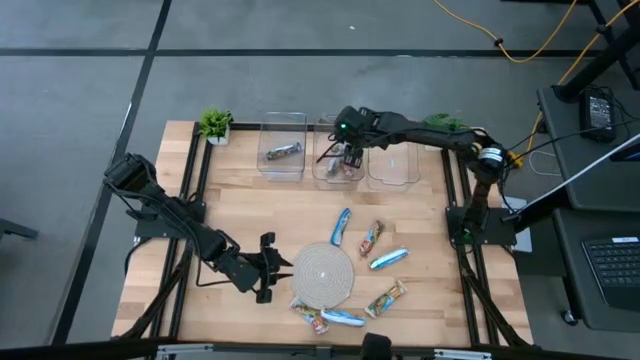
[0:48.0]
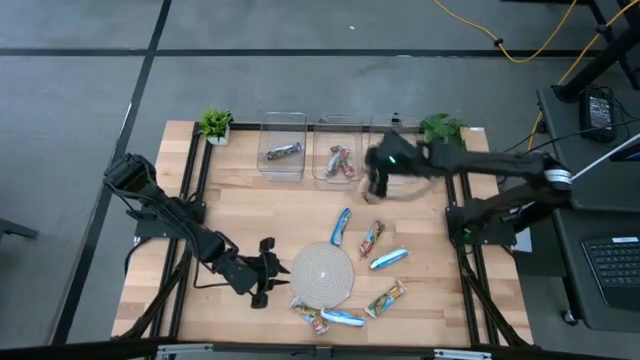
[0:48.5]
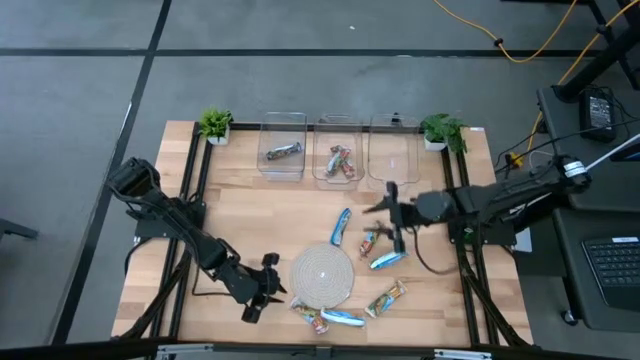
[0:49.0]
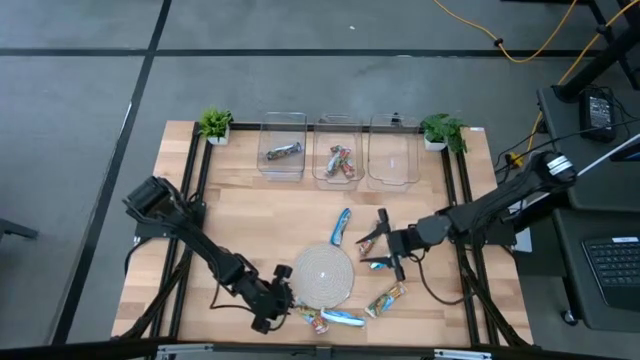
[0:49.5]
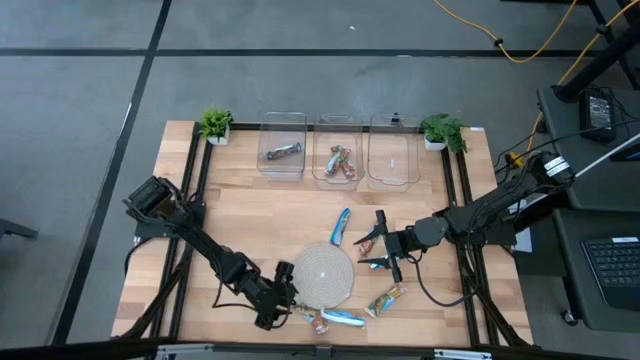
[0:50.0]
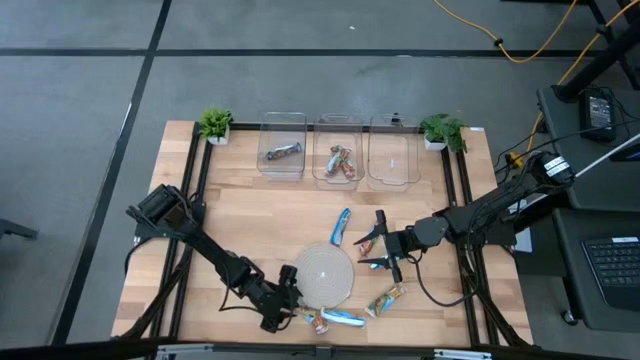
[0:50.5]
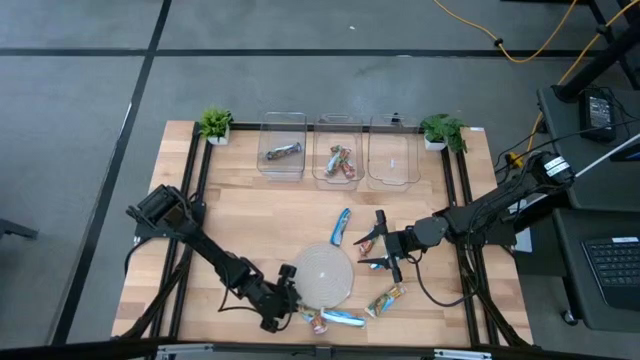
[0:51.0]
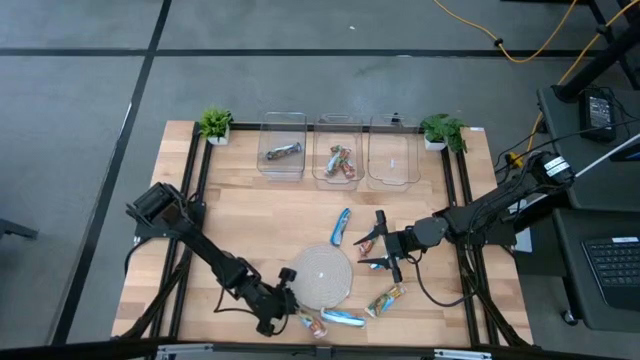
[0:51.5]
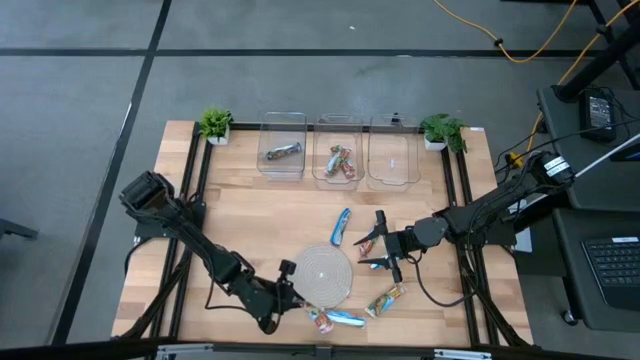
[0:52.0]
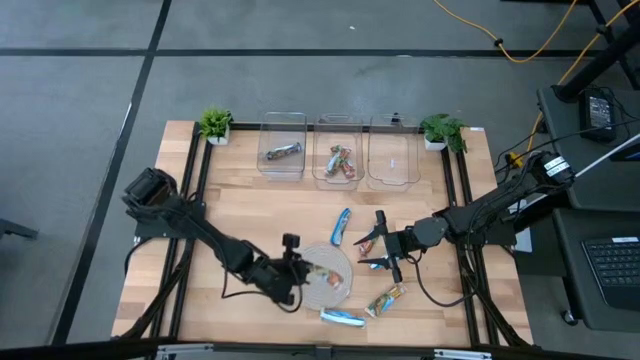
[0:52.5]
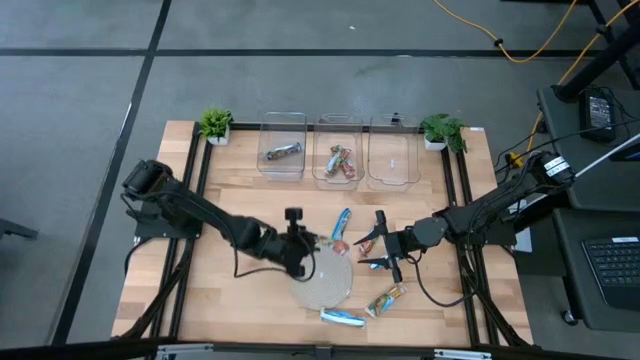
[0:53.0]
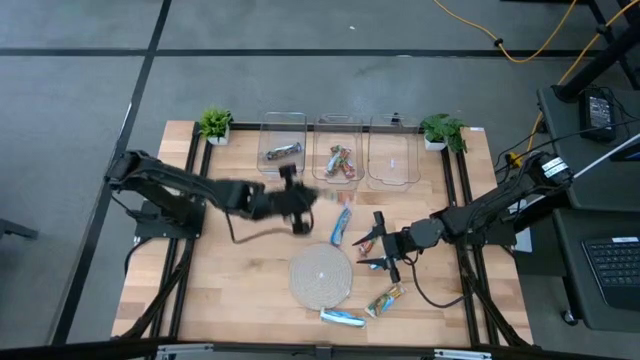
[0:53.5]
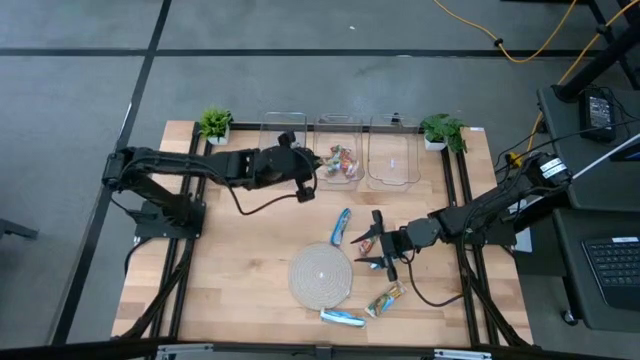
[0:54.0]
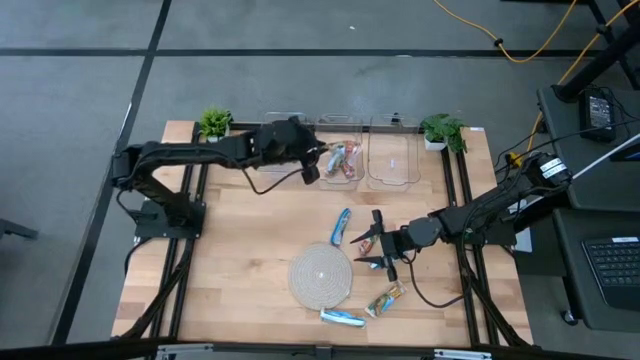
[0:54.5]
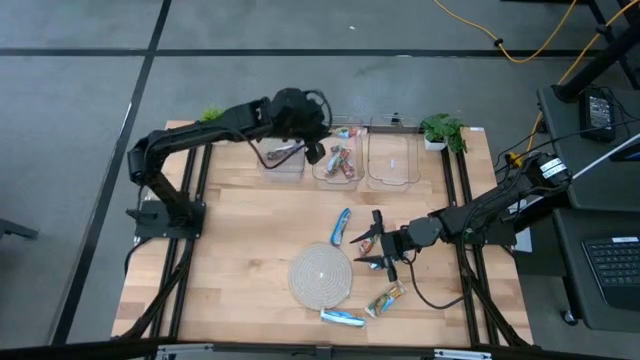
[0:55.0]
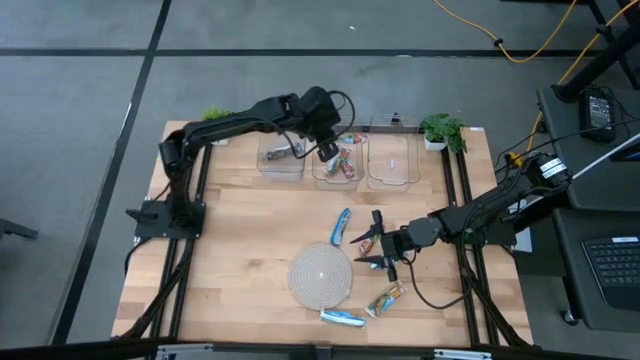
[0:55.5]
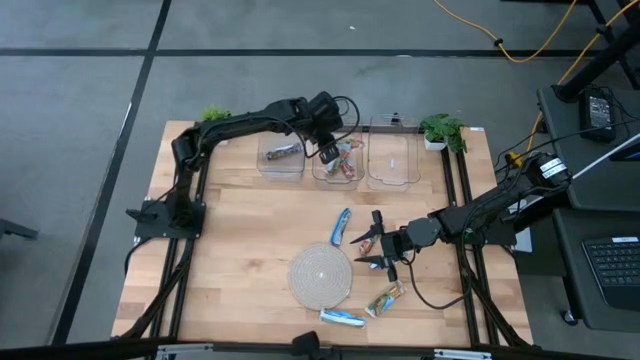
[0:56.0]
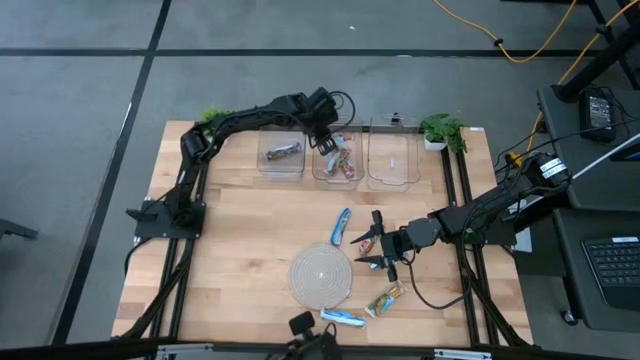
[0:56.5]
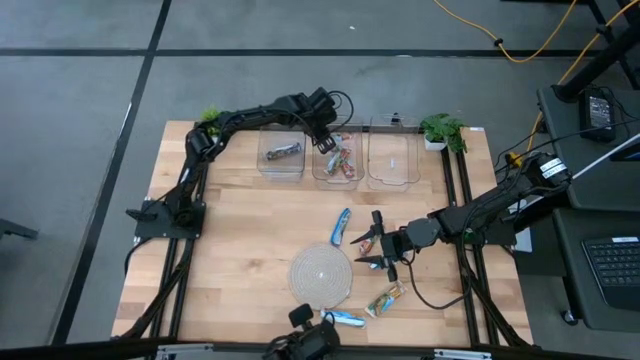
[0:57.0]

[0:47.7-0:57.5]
Task: Pick and place Granola Bars by type
Put the red granola bar into the center transparent bin

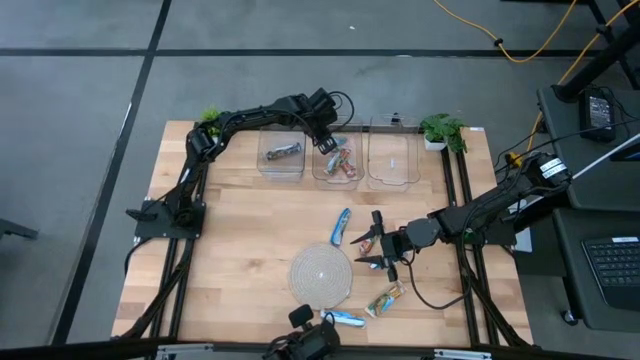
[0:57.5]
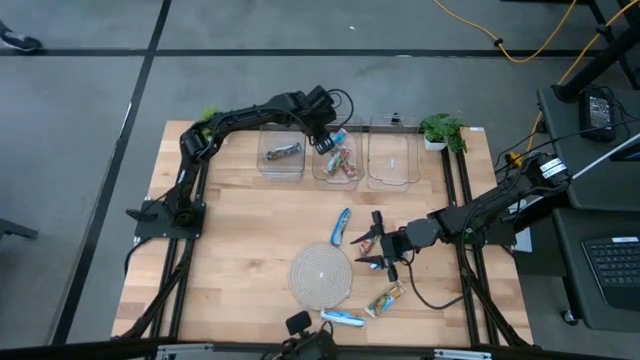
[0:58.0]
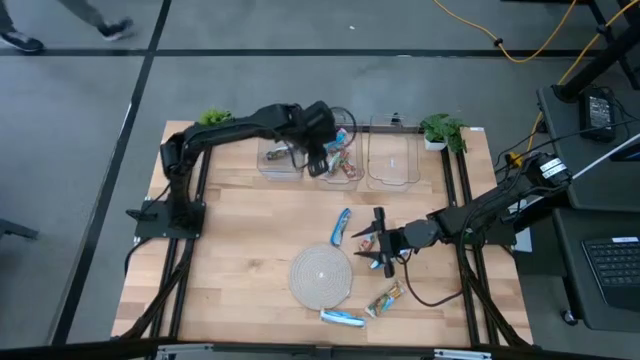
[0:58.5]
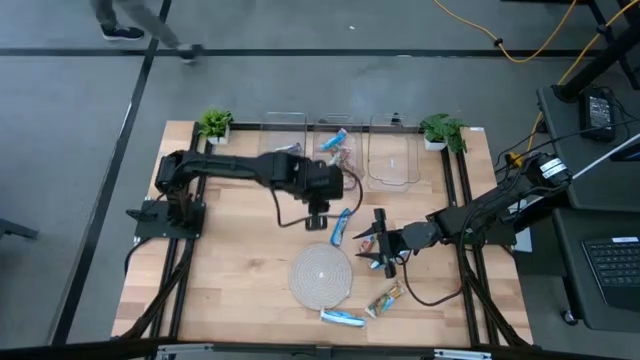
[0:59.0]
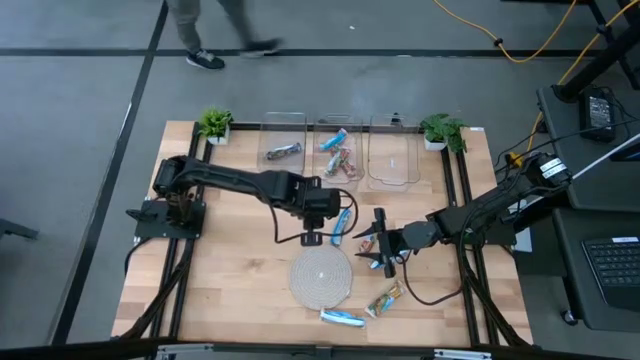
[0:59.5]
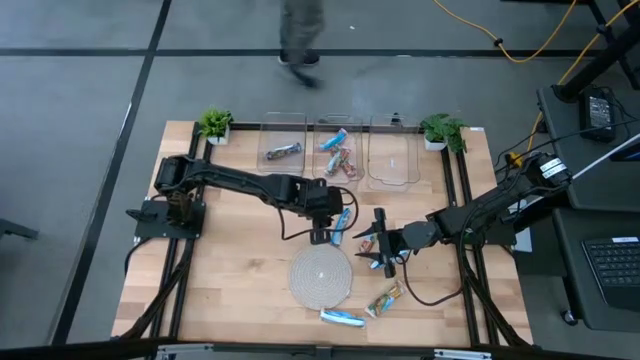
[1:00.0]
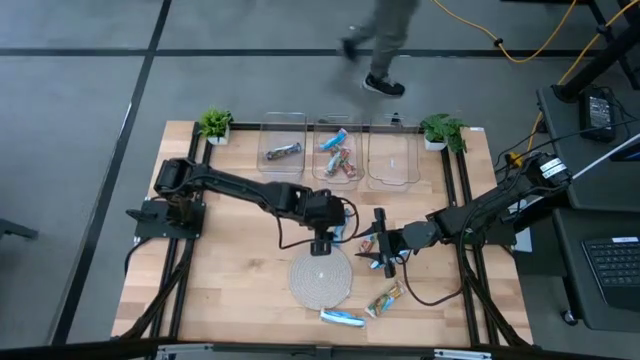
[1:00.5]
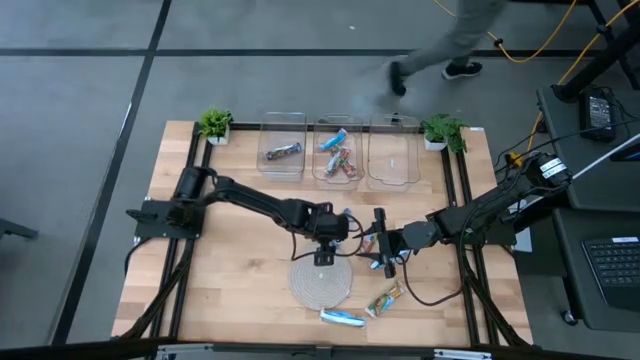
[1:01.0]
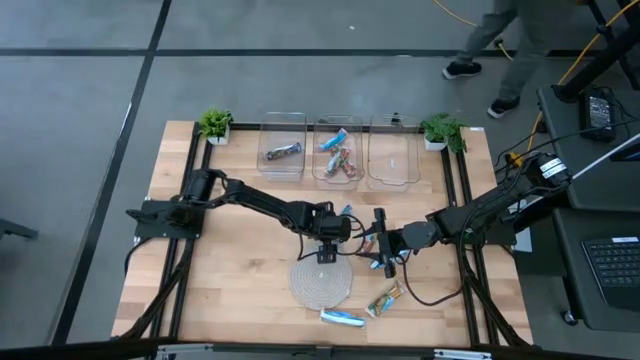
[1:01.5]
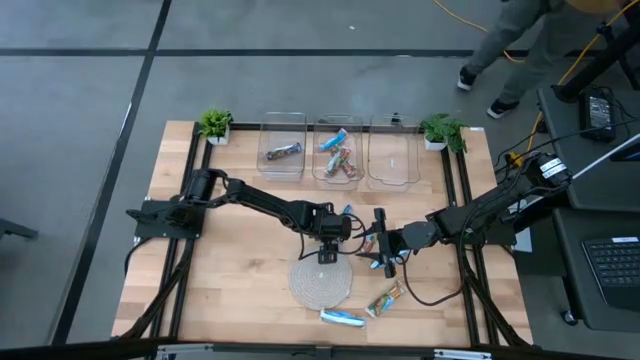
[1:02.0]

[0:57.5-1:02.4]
Put the blue granola bar into the left transparent bin

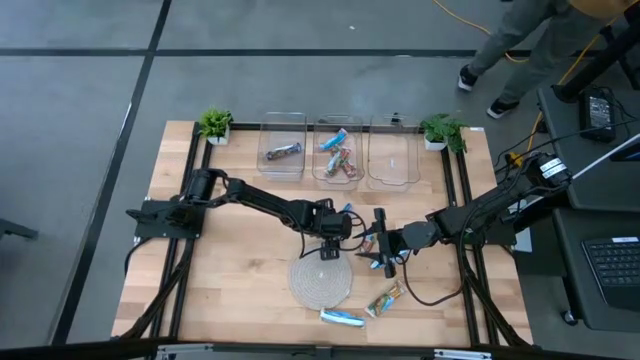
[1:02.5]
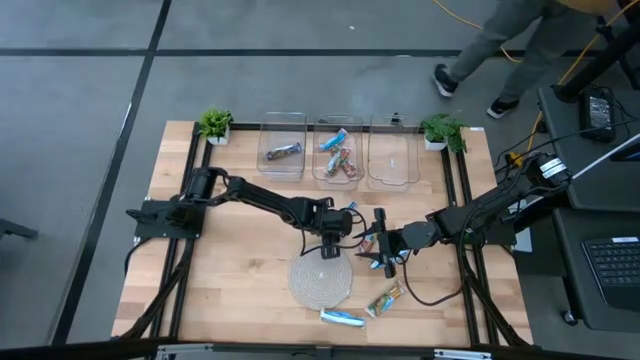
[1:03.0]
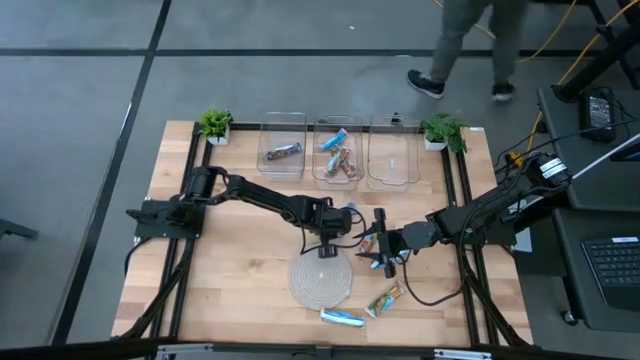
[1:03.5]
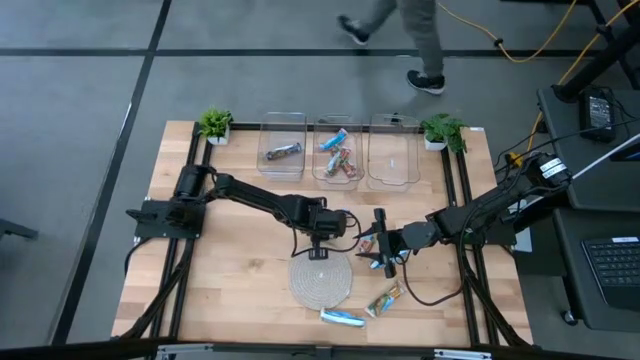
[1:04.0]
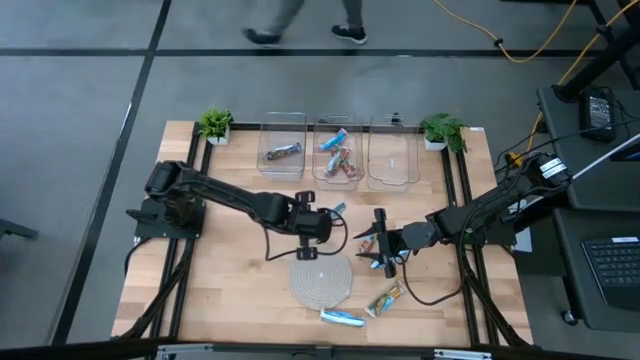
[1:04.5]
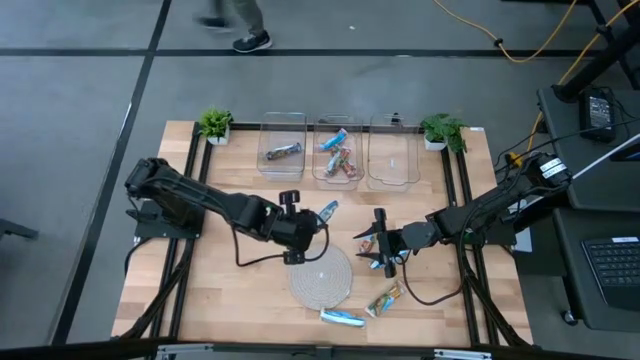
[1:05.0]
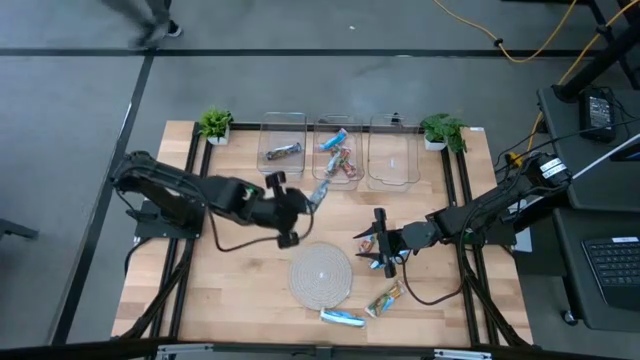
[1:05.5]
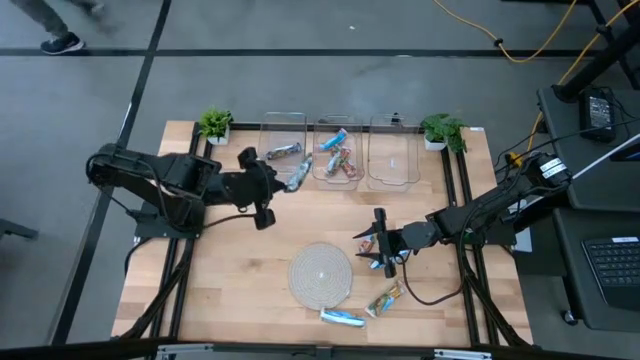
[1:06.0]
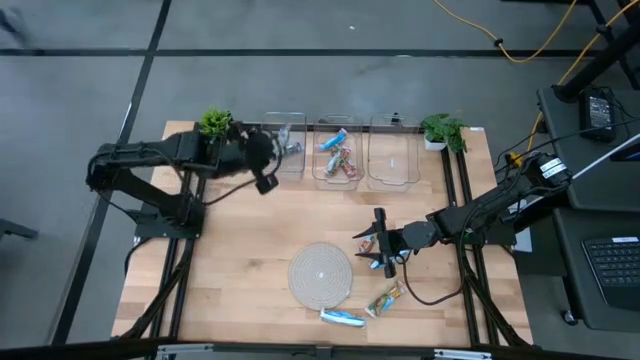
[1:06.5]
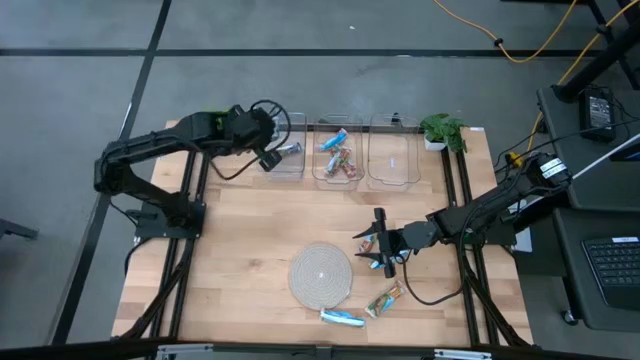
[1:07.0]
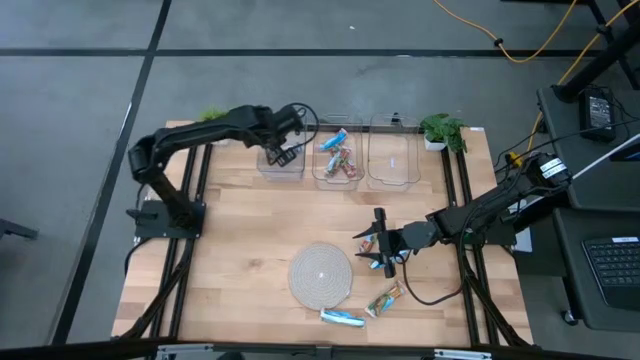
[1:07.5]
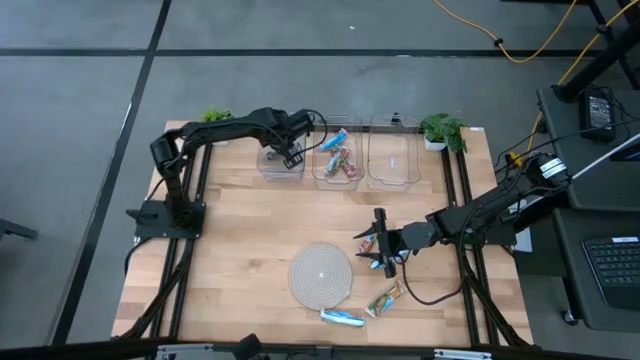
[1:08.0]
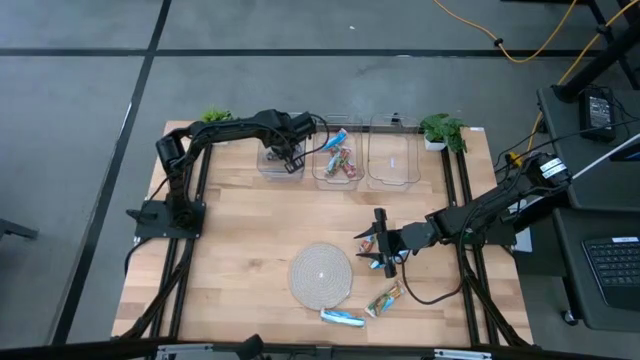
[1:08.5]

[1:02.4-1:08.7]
Put the blue granola bar into the left transparent bin

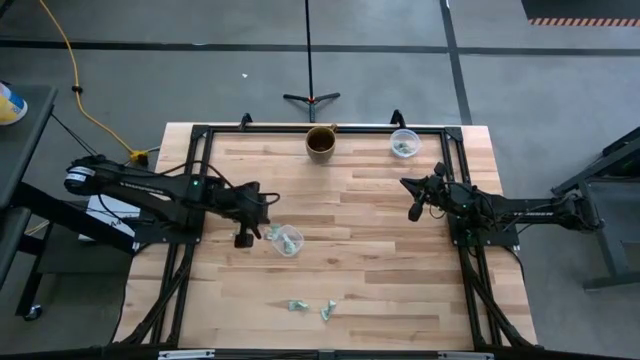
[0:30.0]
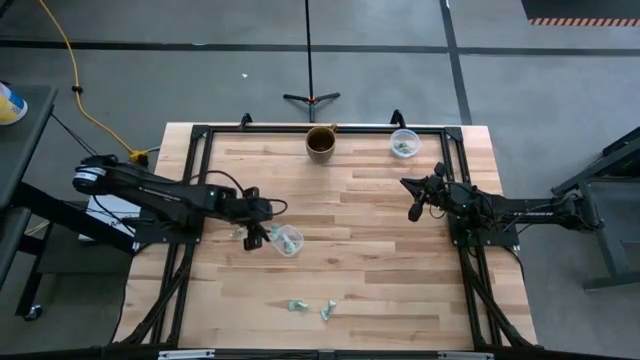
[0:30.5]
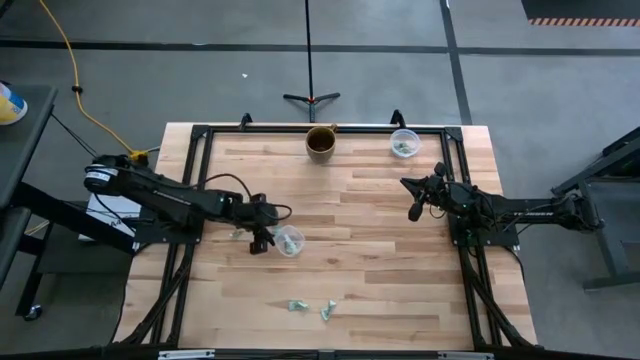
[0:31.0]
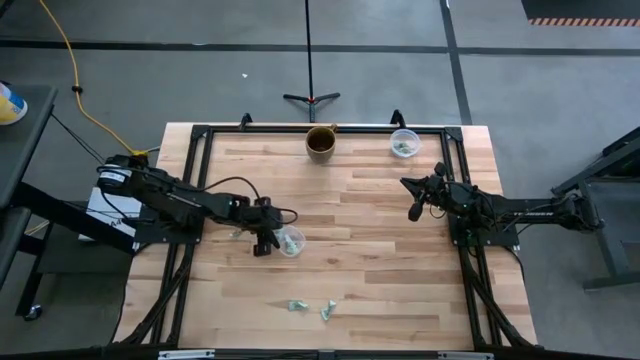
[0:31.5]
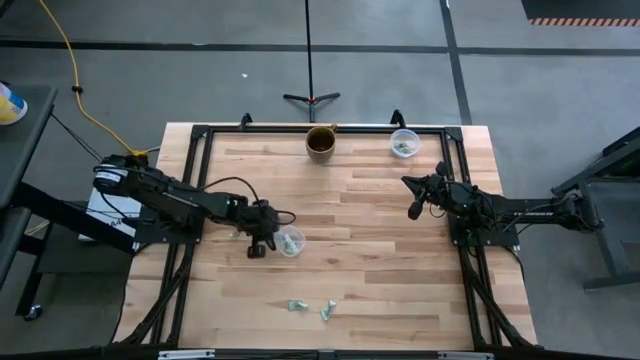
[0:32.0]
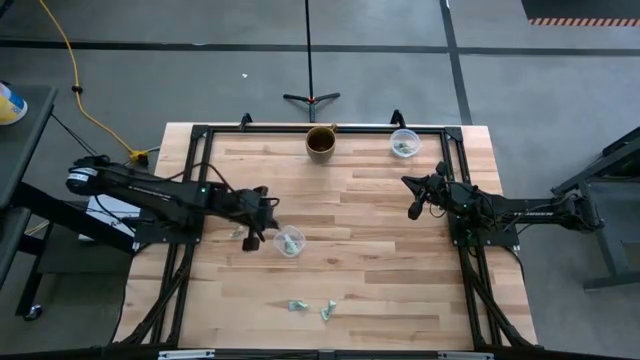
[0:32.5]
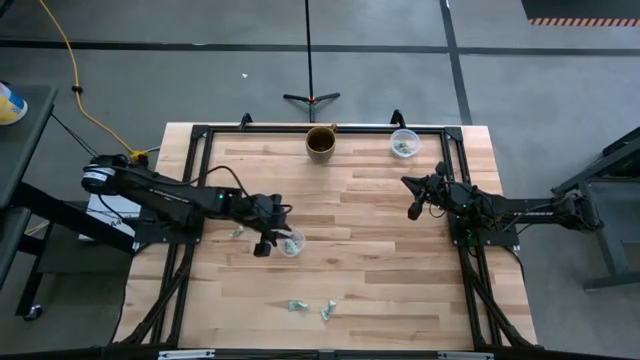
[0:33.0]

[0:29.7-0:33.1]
Task: Pick and place items into bin
Put the stevia packet into the bottom transparent bin
